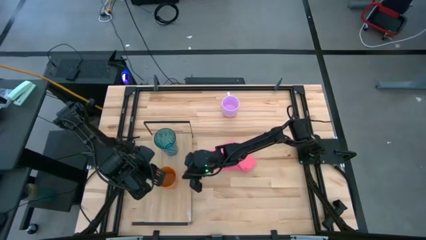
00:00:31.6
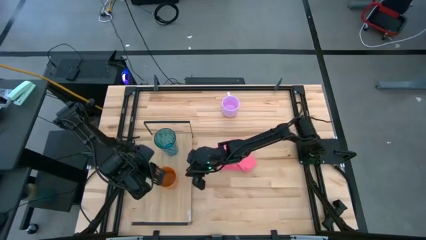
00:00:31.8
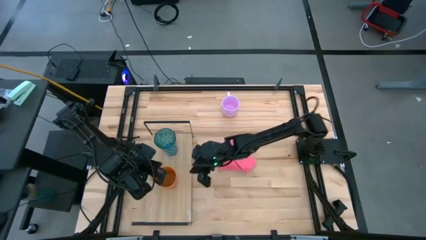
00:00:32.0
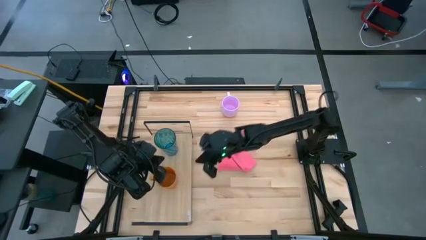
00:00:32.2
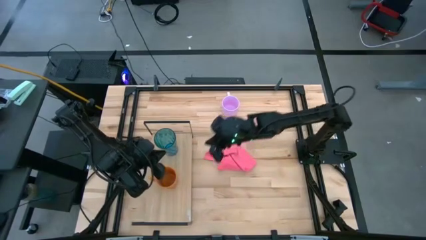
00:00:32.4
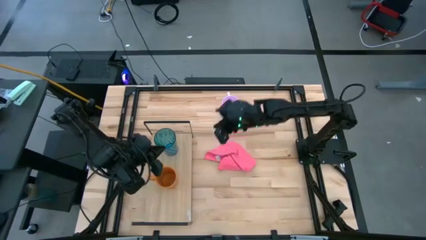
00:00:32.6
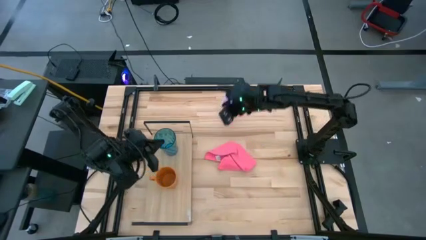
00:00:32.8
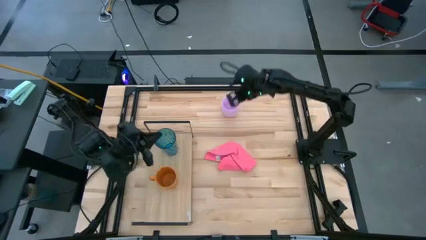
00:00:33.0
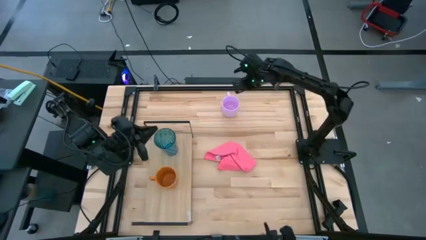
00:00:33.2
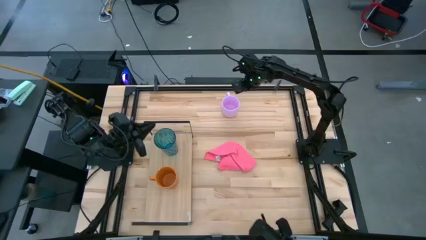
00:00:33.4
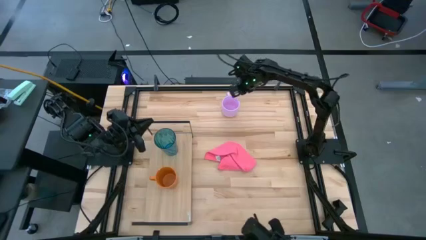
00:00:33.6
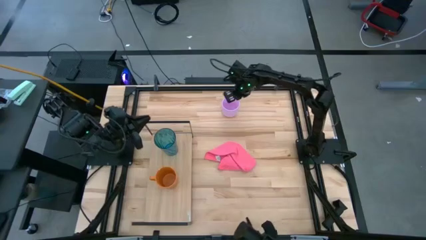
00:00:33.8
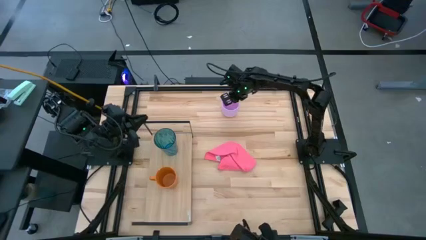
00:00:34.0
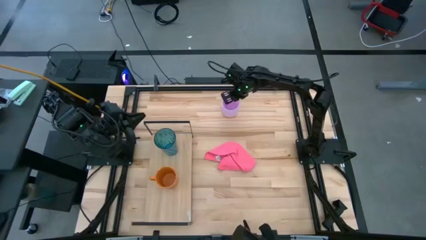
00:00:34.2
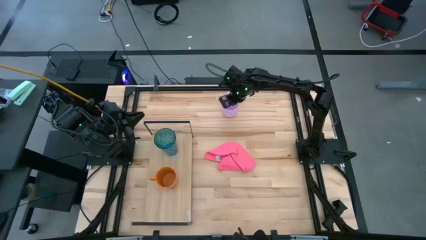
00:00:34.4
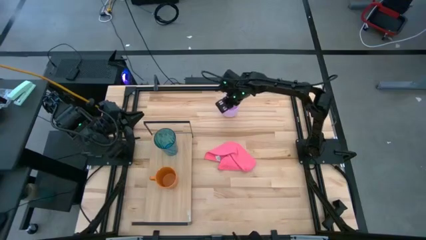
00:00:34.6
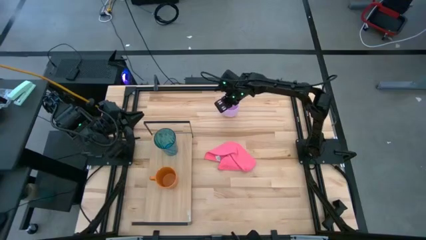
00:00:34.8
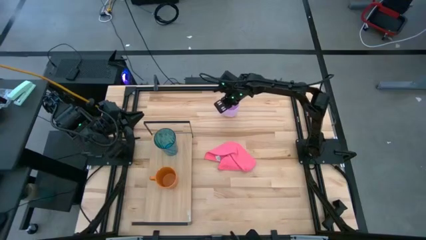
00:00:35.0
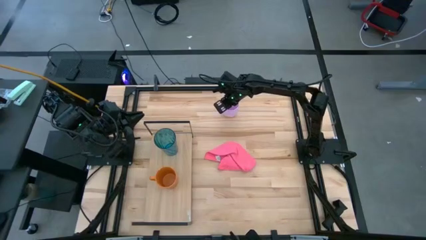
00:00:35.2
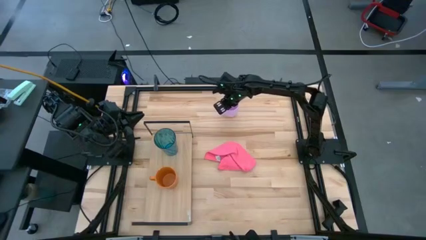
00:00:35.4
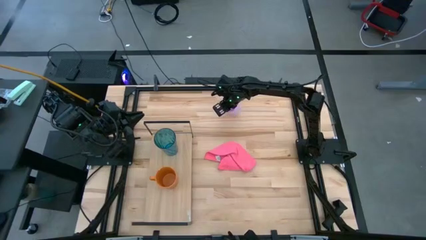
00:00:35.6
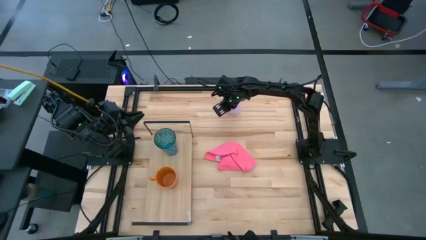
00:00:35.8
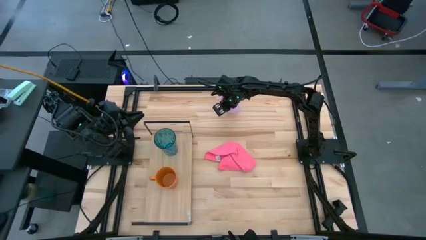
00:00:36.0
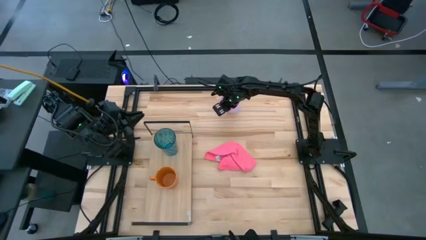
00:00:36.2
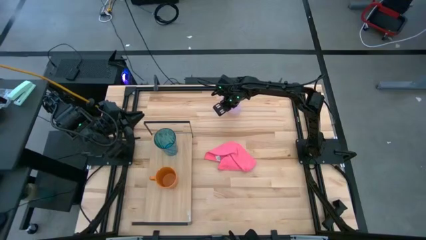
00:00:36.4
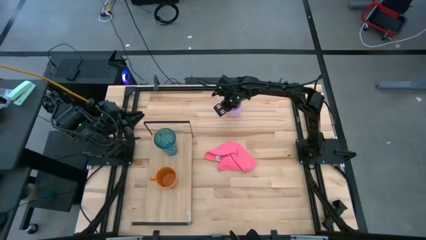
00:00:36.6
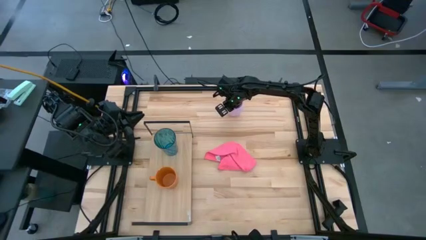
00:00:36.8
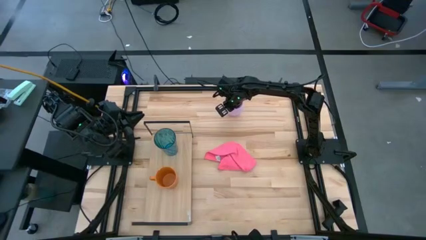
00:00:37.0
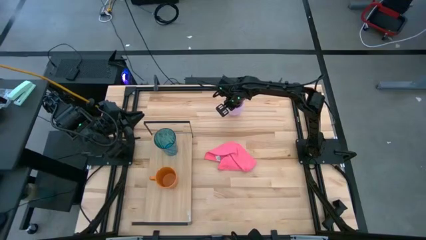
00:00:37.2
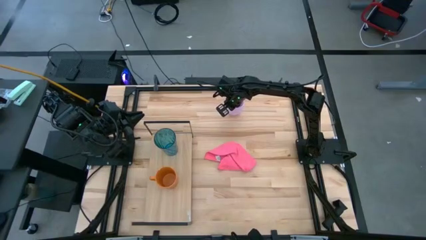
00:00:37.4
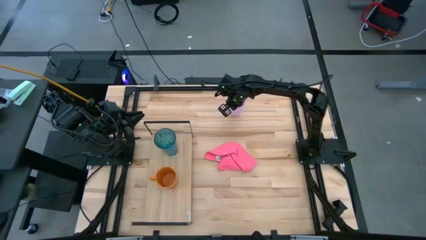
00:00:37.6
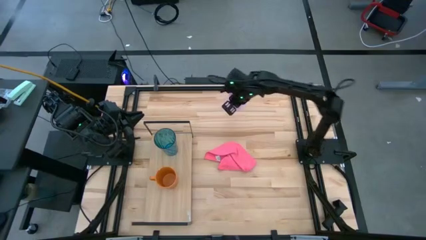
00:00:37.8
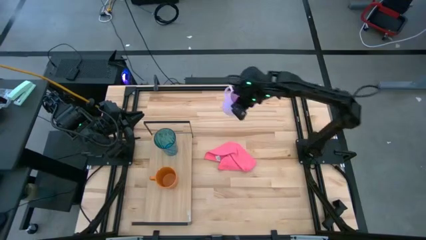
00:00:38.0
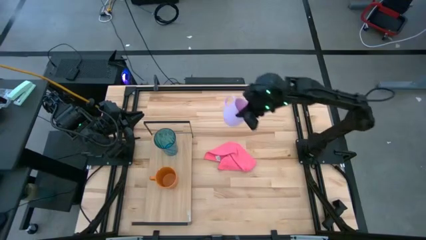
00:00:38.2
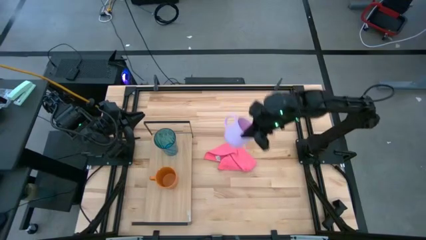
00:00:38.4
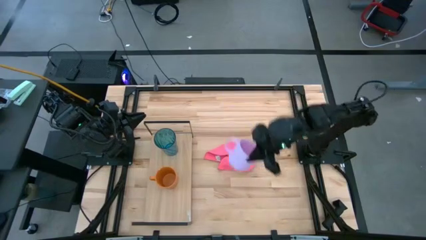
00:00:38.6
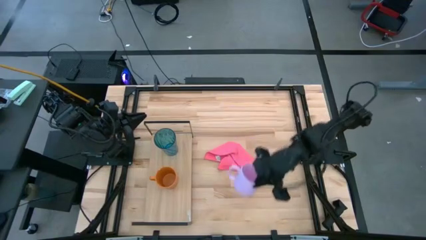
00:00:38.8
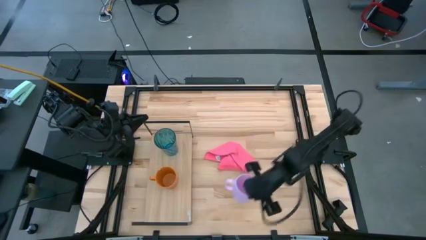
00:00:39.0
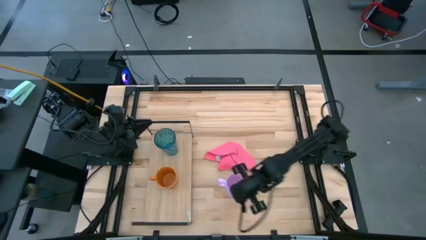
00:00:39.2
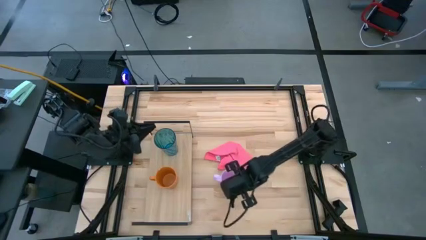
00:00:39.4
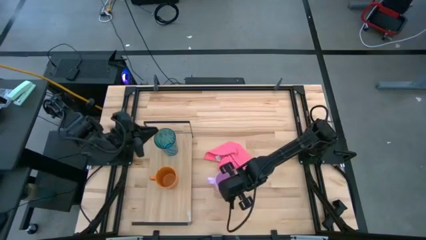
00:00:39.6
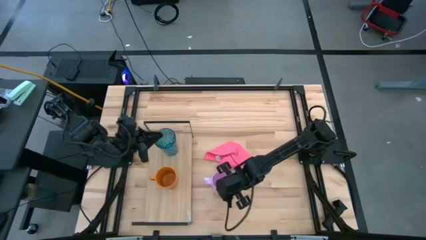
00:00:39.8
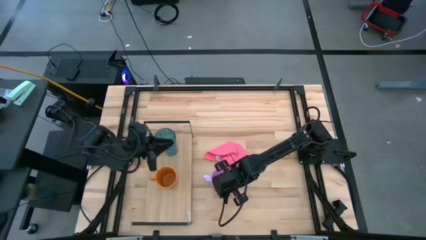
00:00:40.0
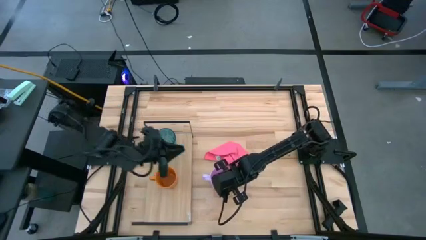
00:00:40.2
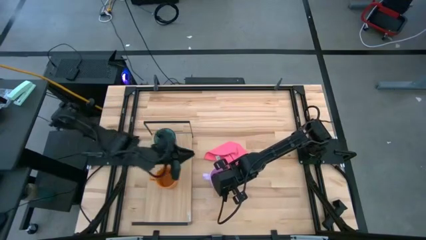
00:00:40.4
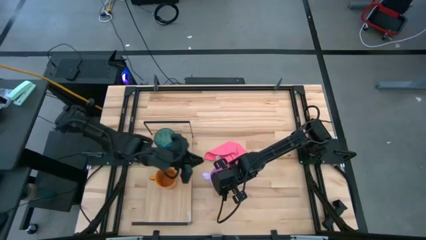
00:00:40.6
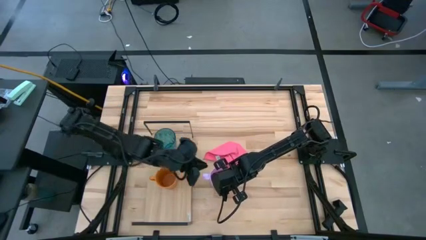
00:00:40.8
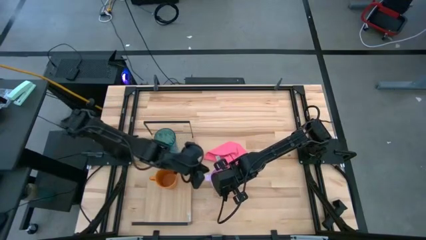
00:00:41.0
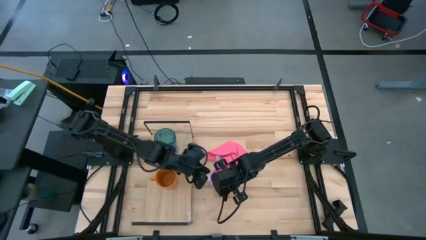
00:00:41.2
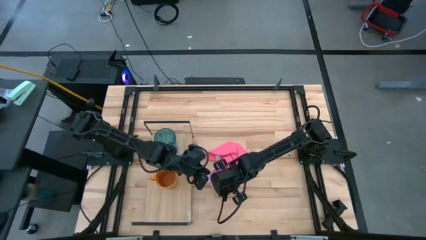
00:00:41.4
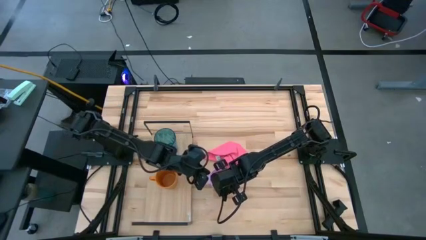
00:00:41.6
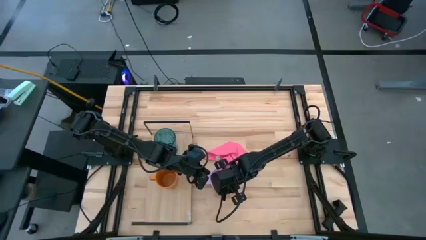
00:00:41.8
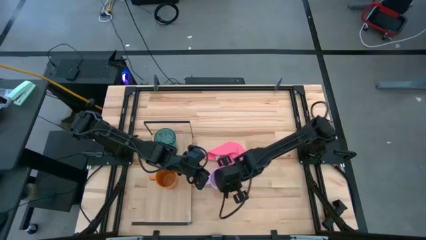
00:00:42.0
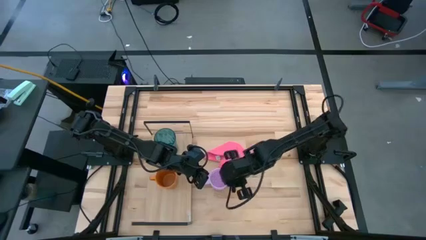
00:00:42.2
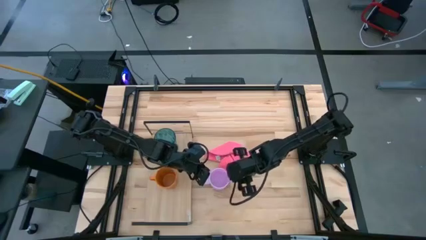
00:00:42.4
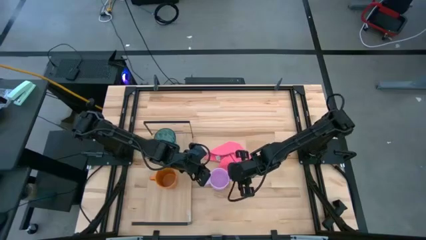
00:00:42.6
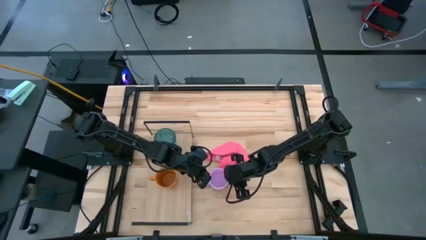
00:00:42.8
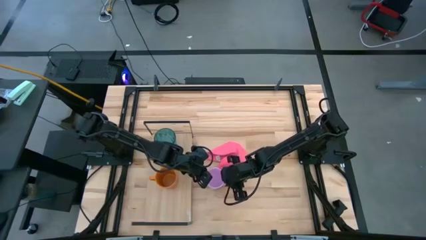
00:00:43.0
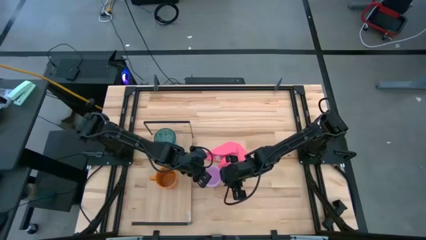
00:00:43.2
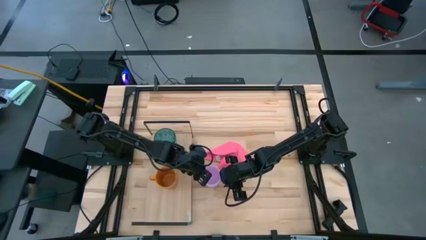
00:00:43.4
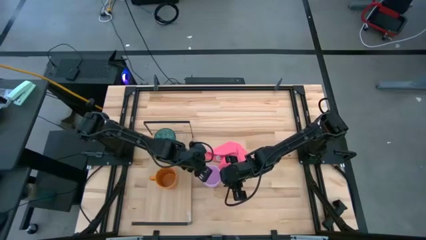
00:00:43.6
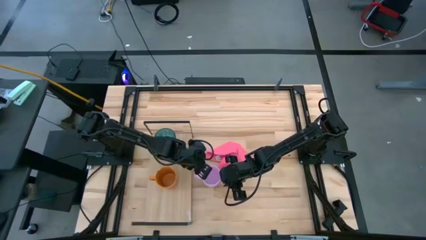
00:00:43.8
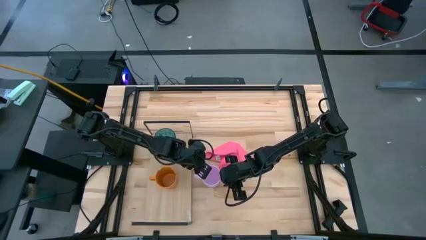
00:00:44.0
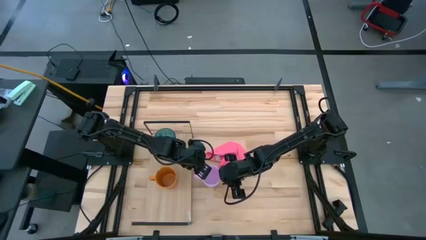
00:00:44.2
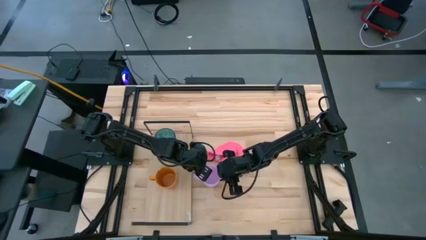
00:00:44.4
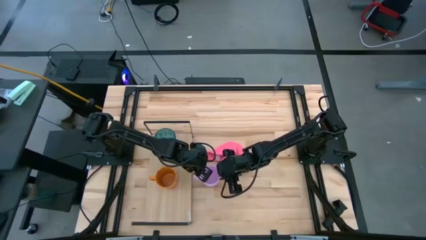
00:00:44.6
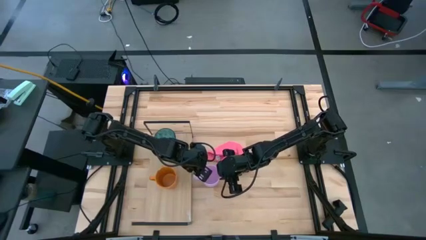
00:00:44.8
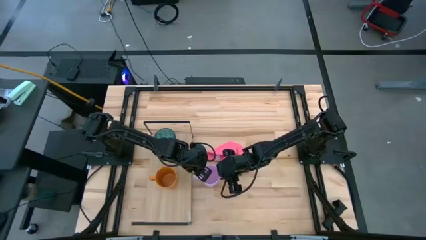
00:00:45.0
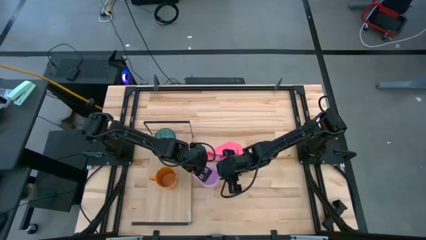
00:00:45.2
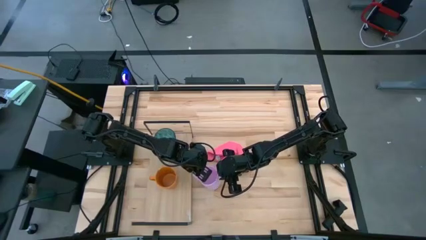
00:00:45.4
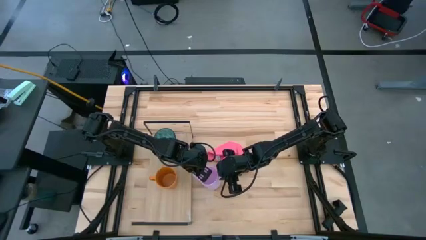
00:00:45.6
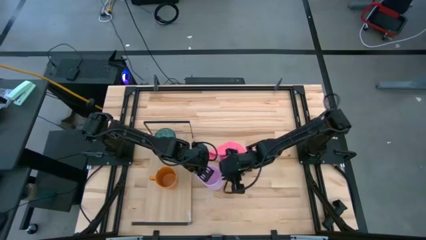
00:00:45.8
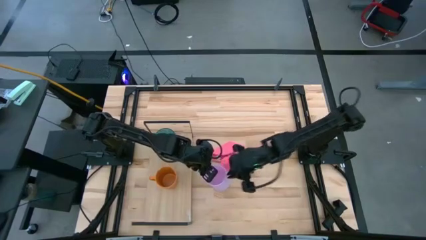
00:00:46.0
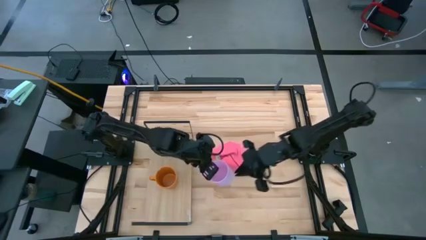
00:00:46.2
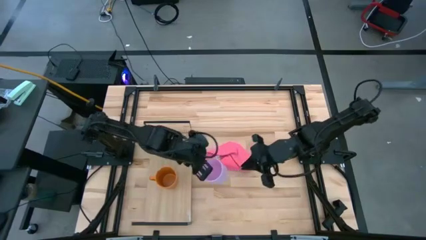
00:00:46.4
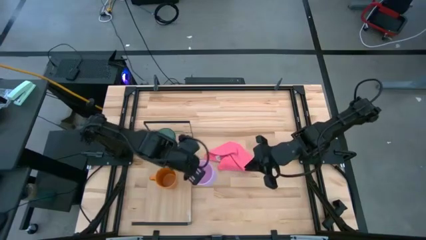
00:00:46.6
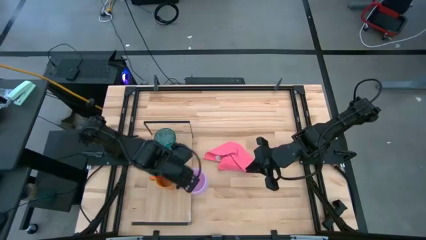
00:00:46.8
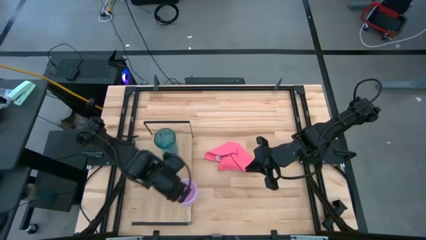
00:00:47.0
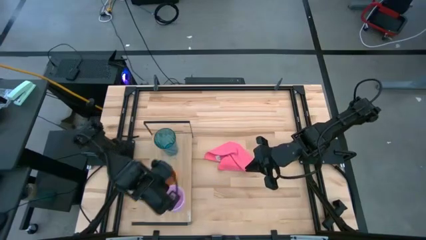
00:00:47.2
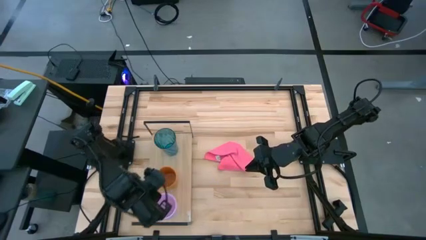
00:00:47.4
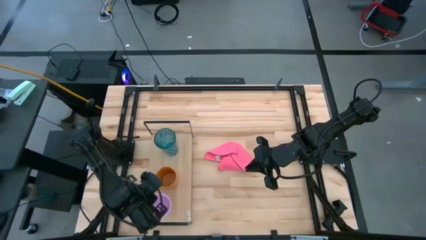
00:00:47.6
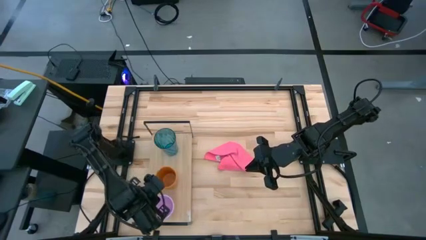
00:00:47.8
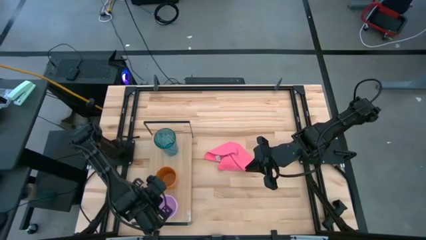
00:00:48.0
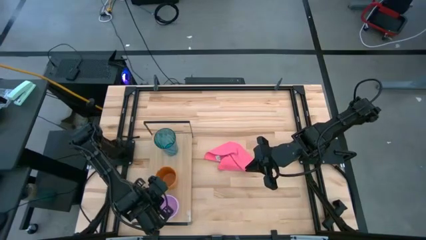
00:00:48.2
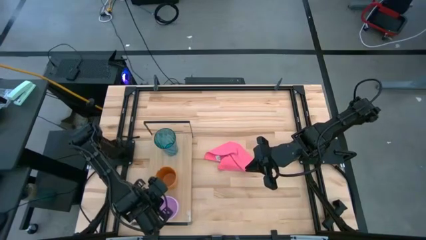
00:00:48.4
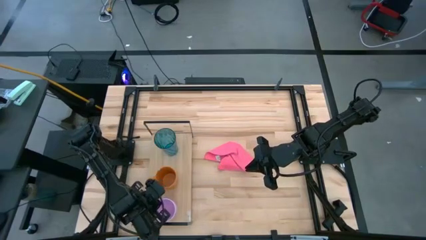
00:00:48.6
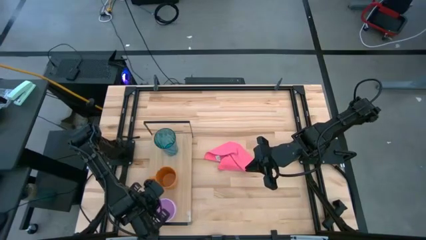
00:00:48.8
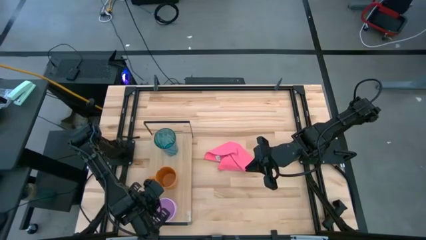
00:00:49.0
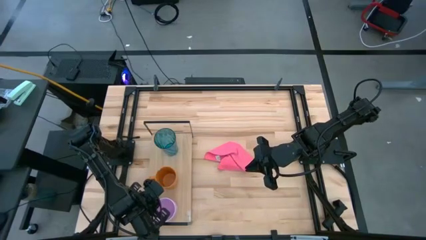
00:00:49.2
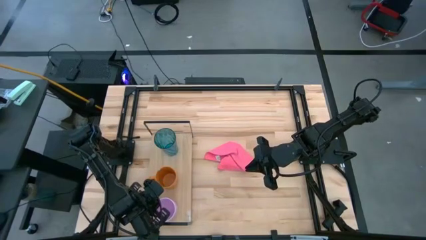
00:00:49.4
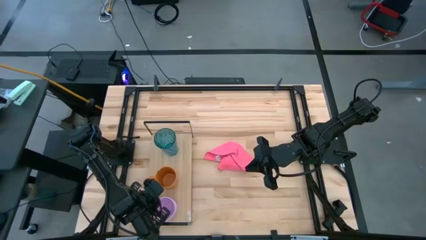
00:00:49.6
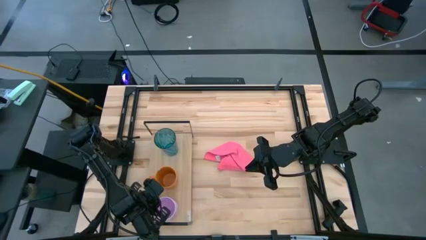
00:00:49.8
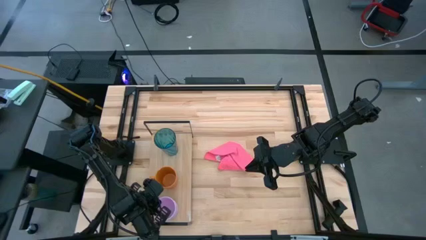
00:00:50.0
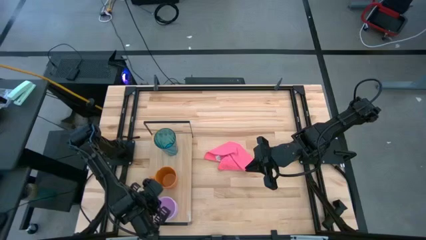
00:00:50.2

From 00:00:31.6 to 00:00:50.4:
Task: Stack small to large cups/mugs on shelf
Put the violet mug on the shelf
